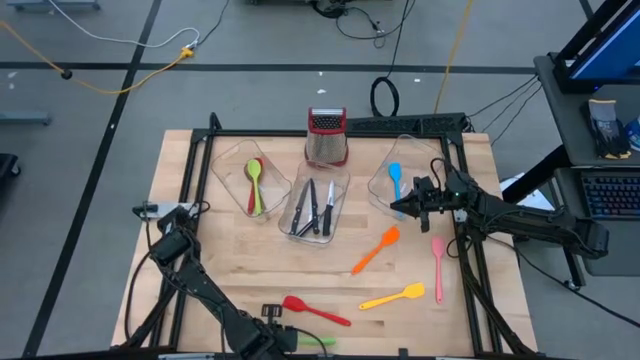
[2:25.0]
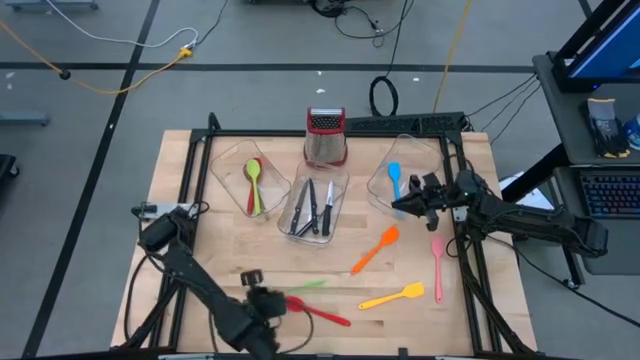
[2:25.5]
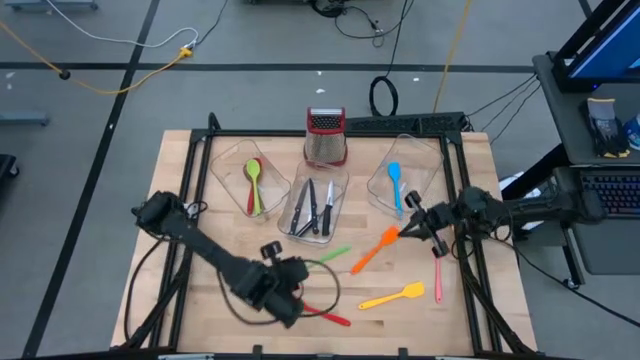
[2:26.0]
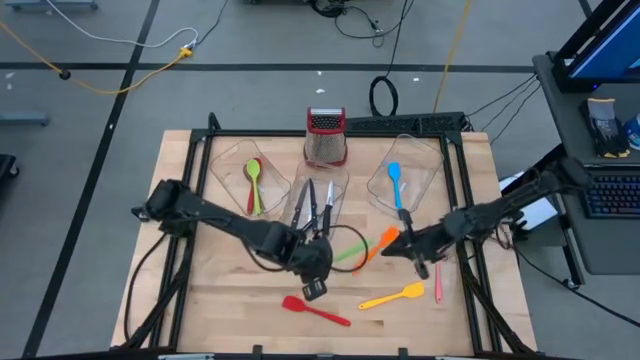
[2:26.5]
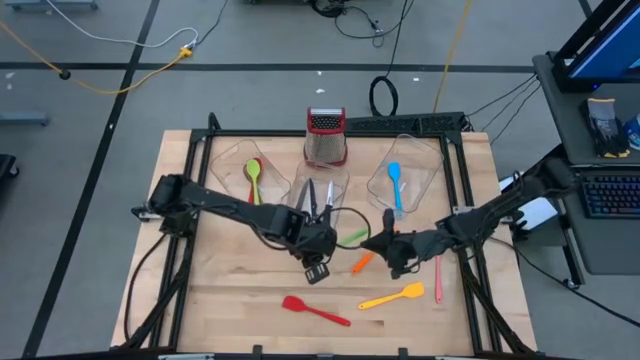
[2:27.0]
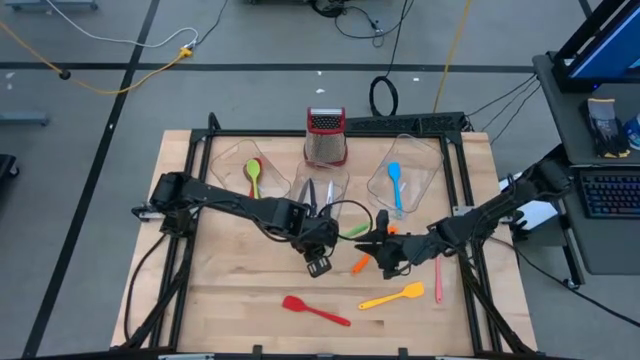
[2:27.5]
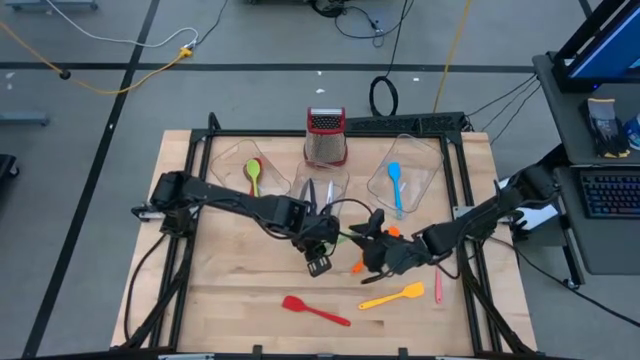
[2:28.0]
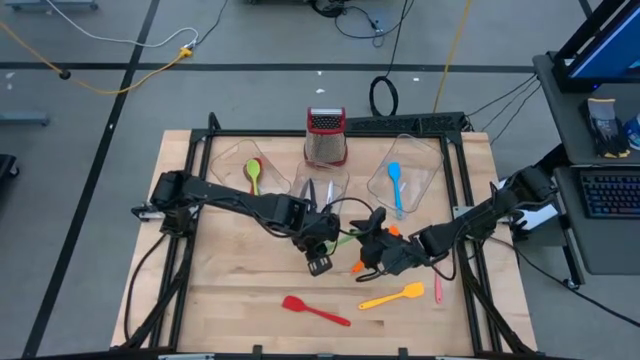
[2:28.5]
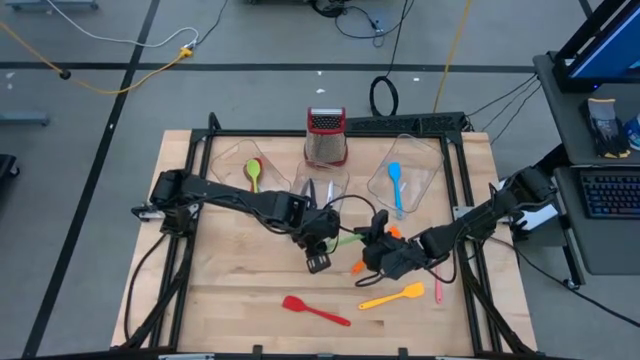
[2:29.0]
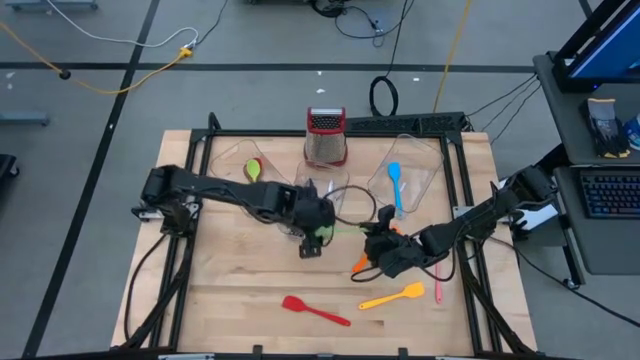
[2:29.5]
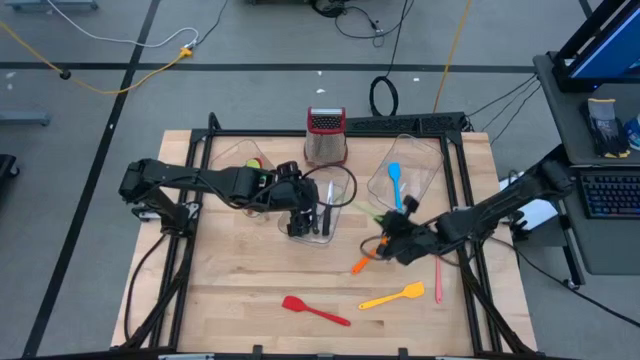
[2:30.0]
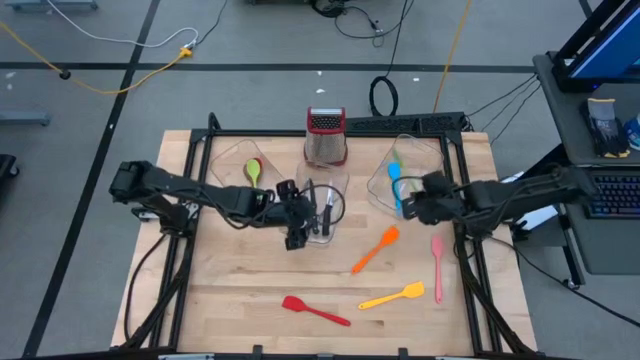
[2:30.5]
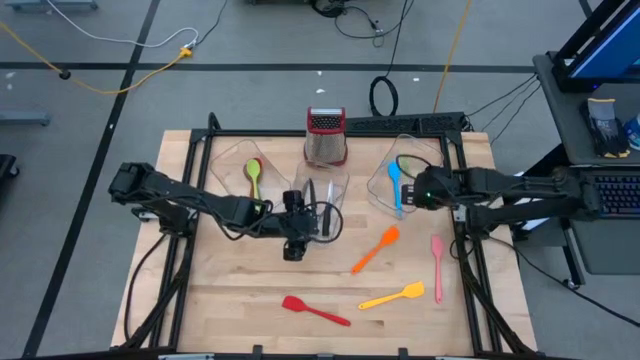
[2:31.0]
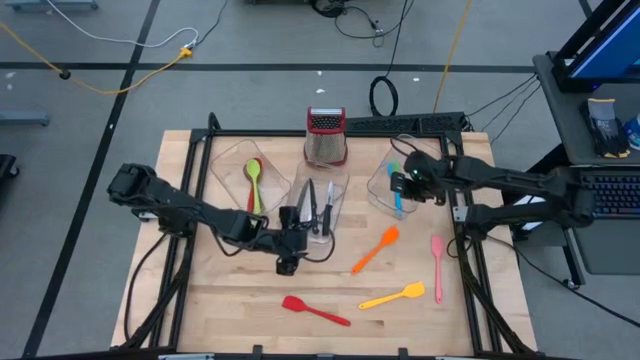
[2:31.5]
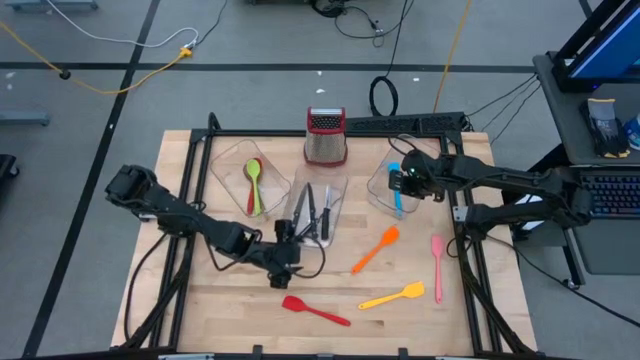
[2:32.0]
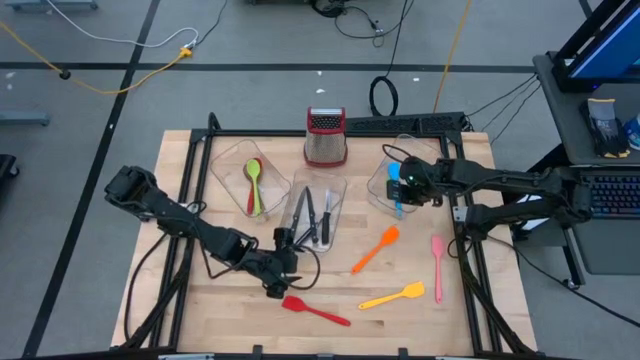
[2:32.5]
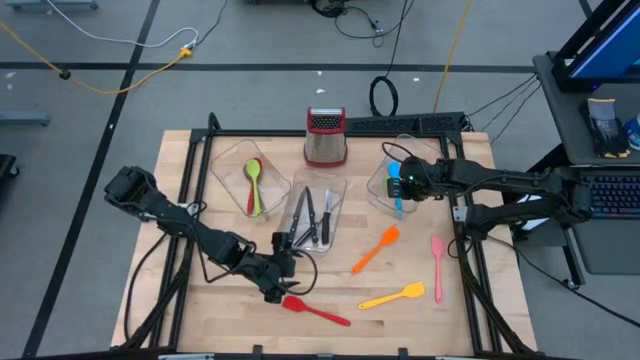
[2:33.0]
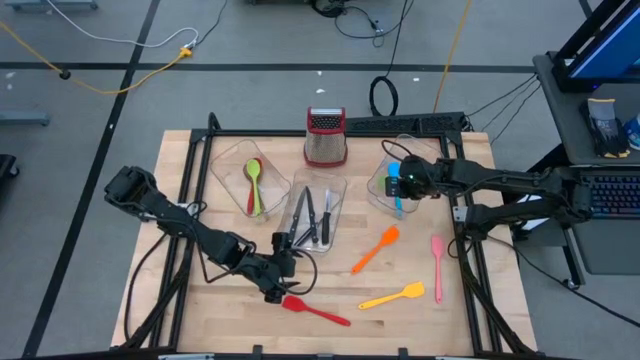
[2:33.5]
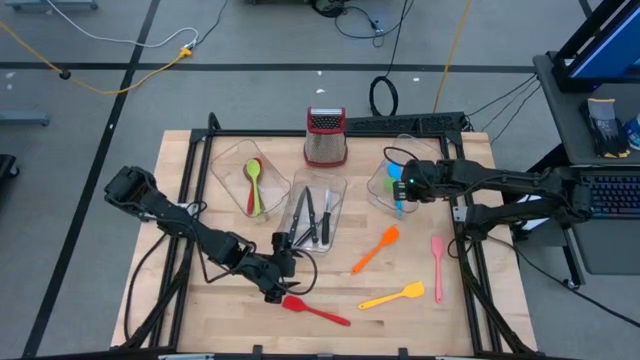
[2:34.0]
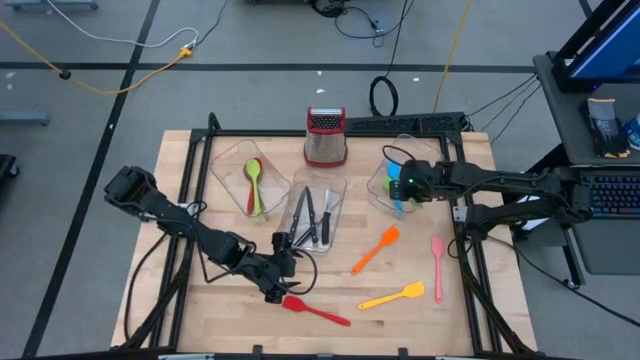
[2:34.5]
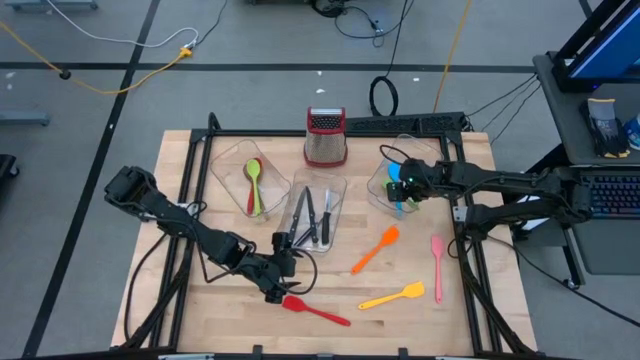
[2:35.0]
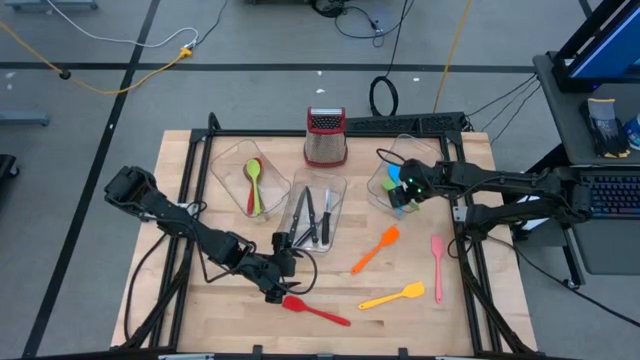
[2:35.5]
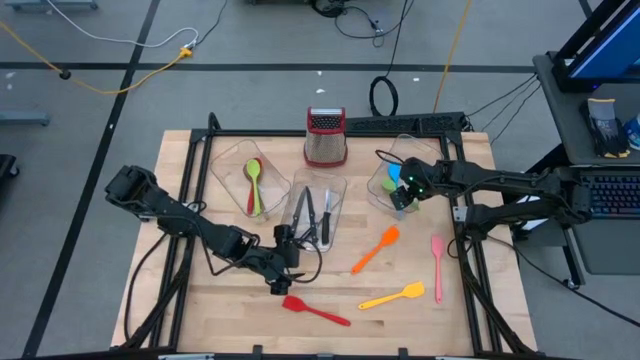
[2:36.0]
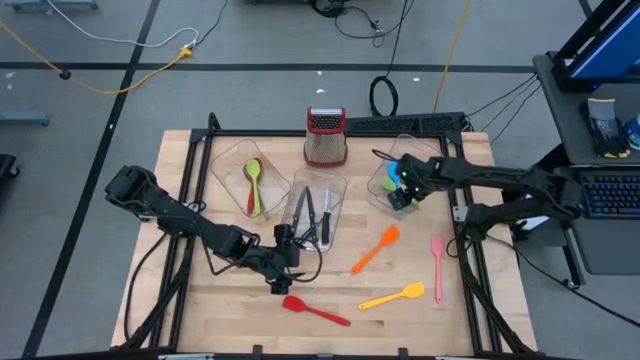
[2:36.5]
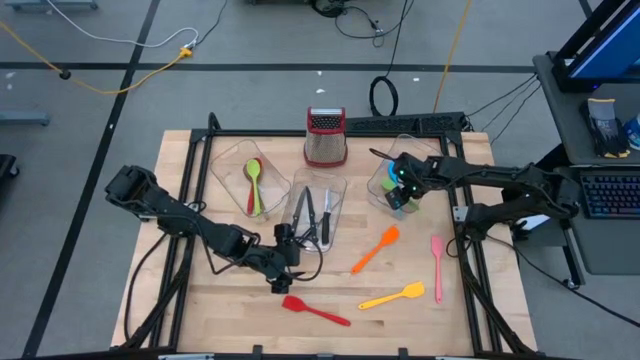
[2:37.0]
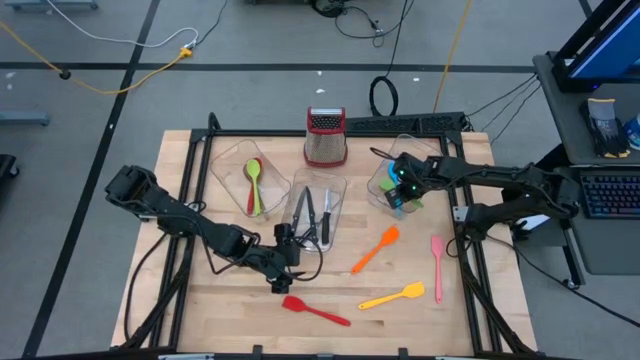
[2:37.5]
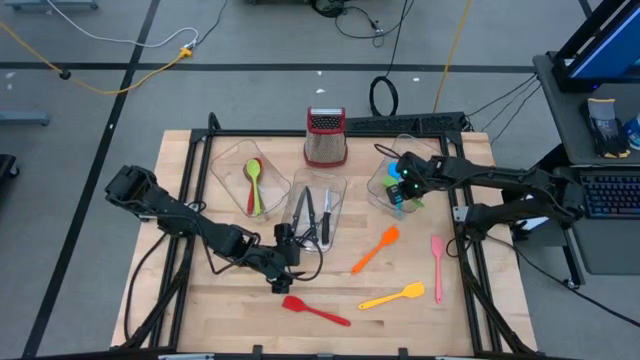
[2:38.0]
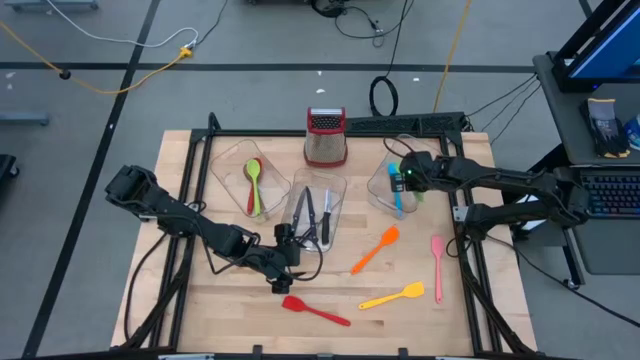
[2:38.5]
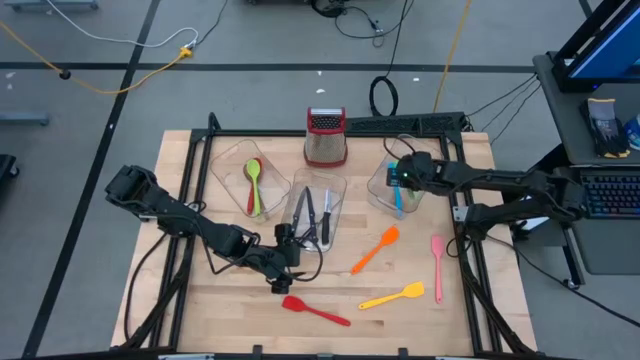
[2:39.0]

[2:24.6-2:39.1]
Task: Pick & Place Kitchen Items
Put the green spatula on the right transparent bin

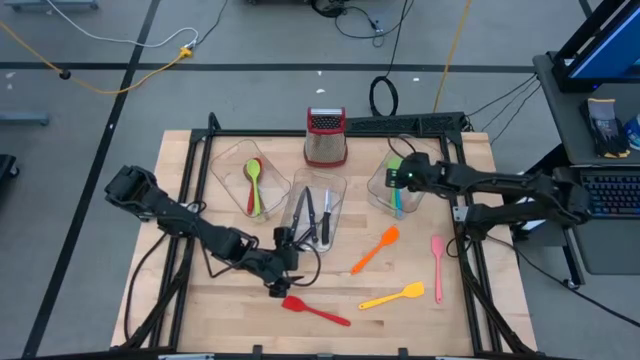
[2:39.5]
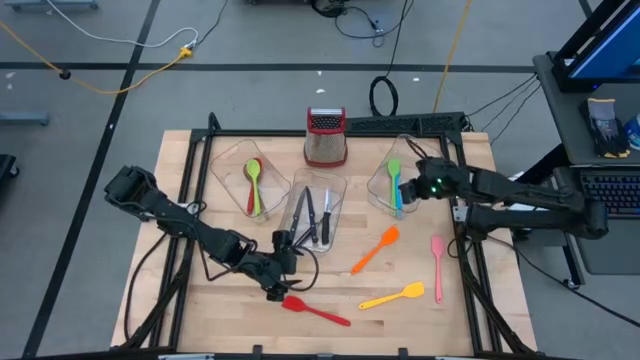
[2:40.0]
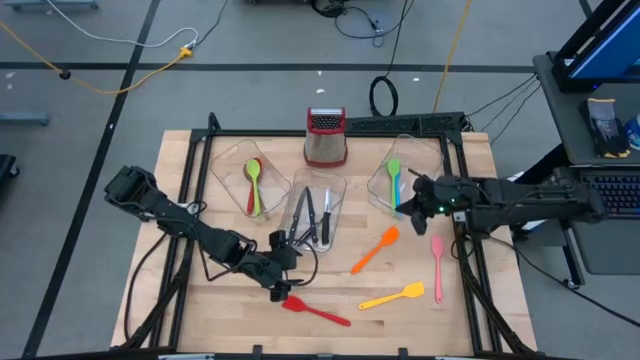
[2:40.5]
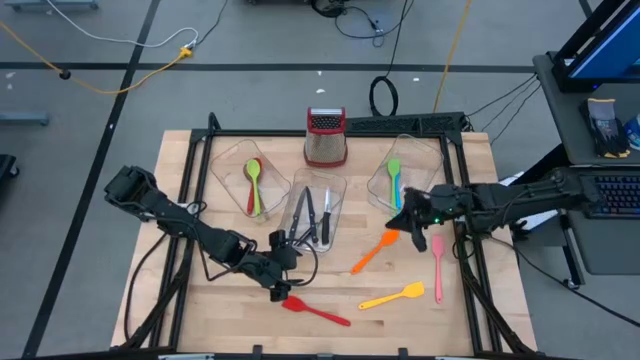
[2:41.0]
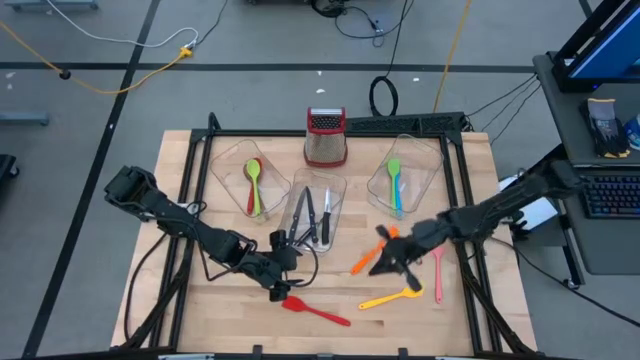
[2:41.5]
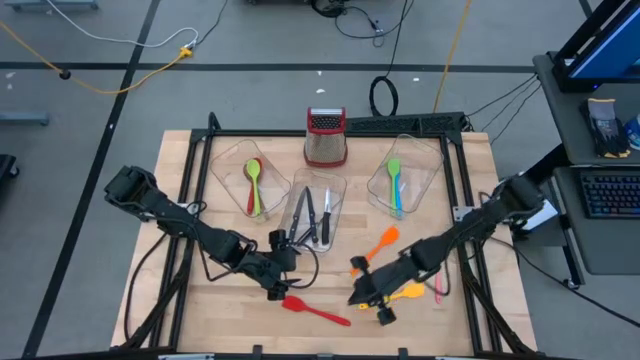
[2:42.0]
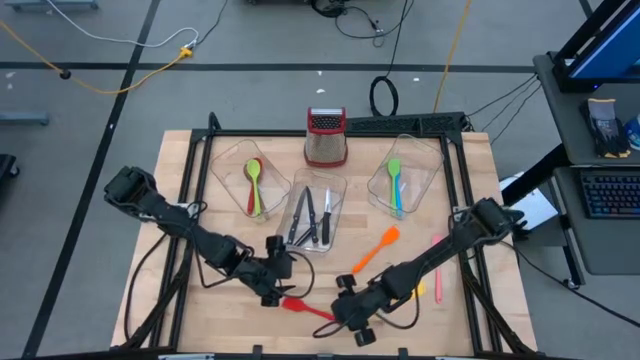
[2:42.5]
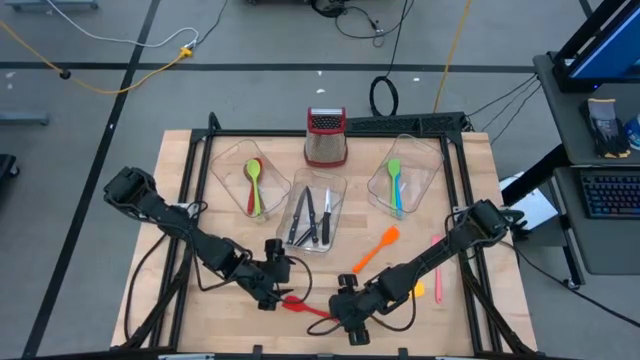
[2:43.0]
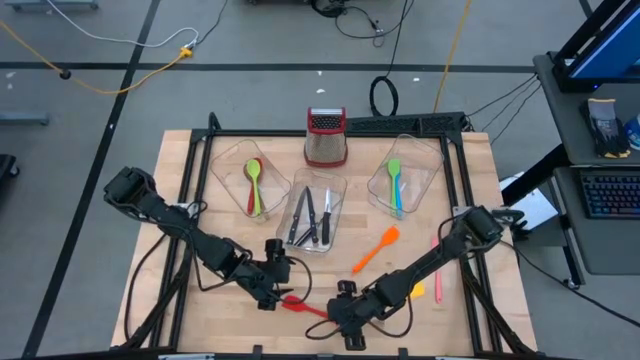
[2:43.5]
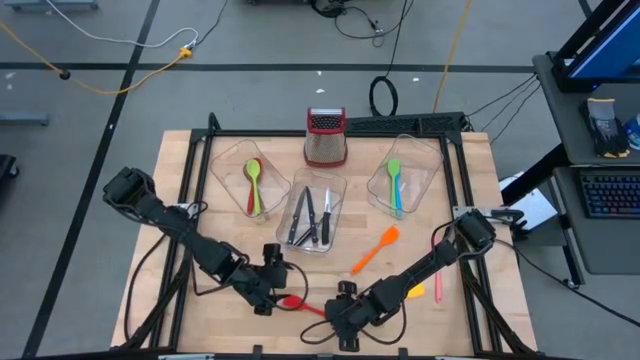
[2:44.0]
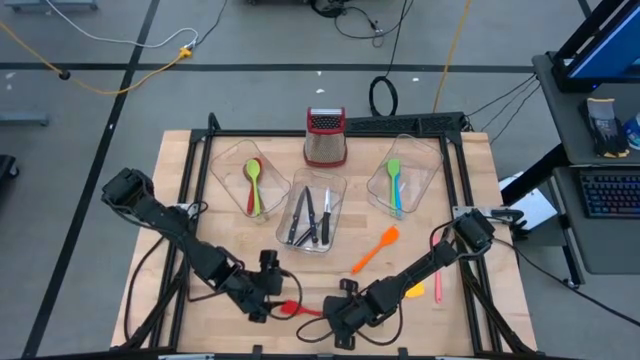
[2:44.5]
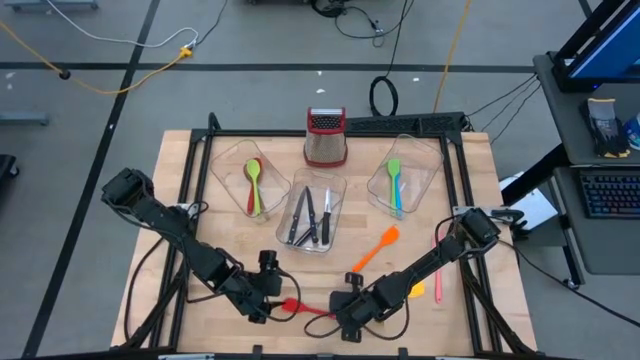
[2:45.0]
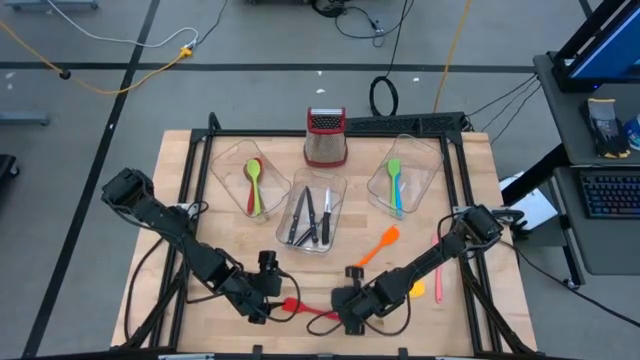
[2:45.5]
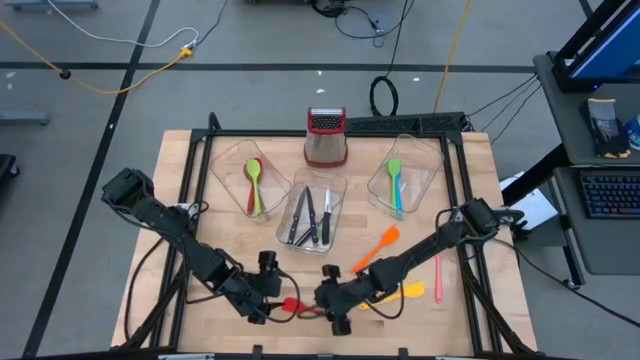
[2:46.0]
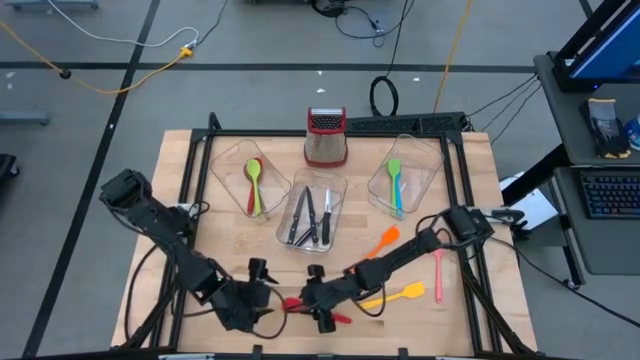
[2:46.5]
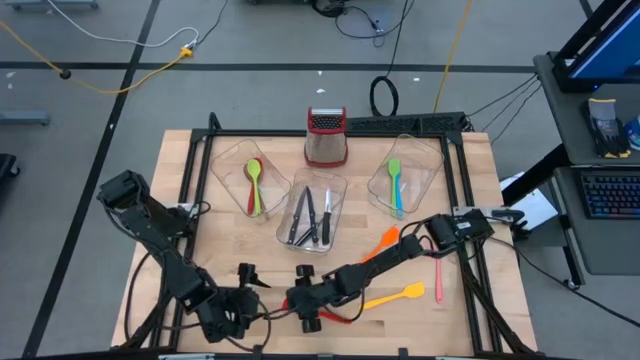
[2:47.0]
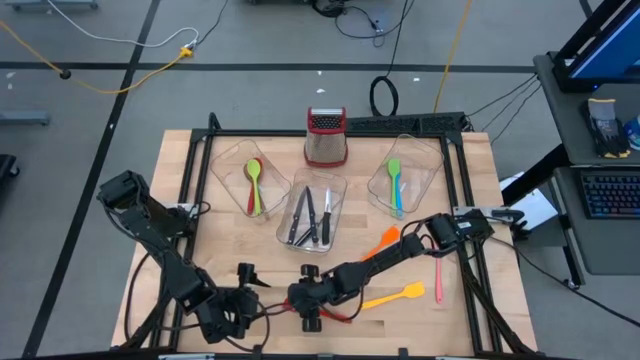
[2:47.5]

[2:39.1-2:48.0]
Put the red spatula on the right transparent bin
